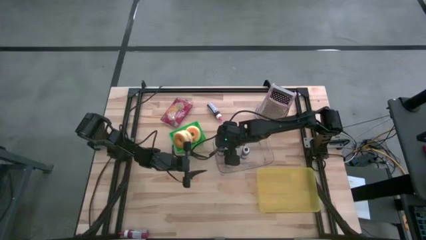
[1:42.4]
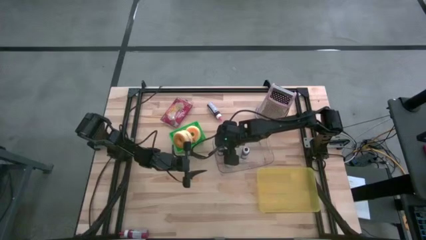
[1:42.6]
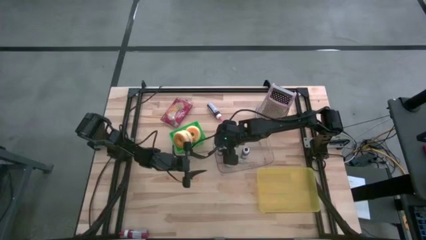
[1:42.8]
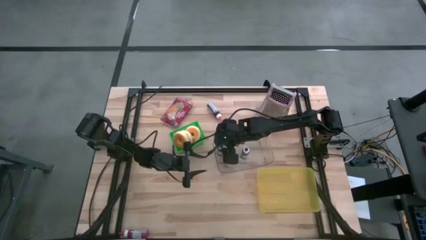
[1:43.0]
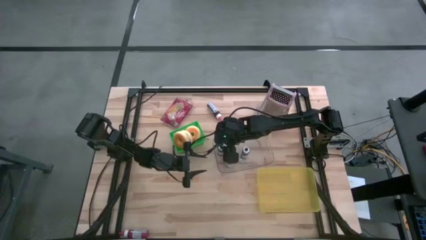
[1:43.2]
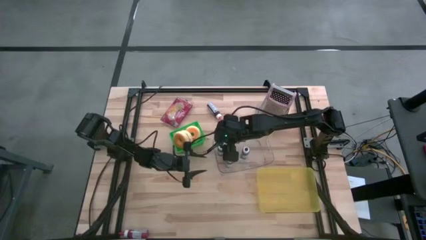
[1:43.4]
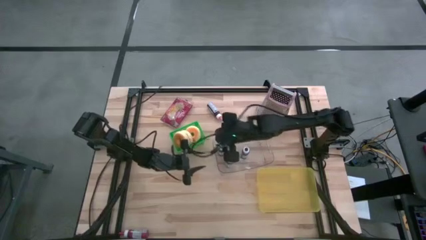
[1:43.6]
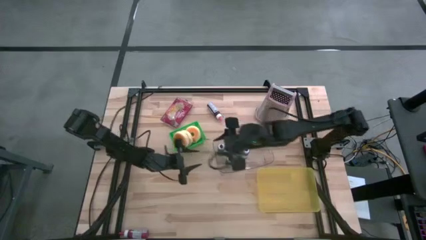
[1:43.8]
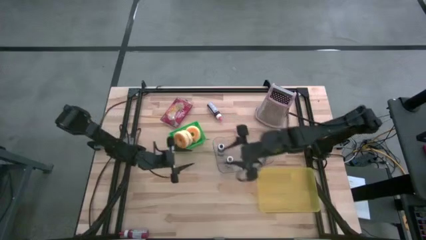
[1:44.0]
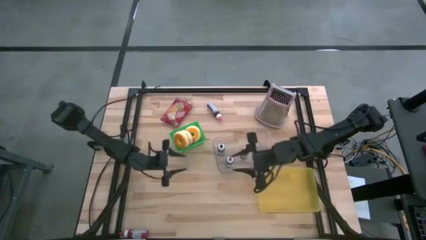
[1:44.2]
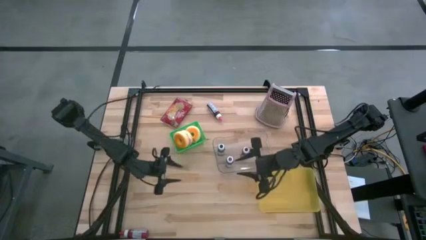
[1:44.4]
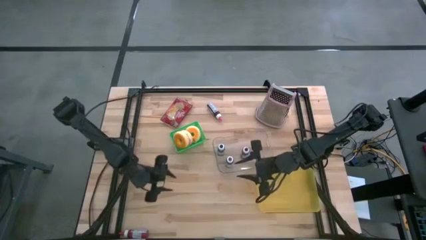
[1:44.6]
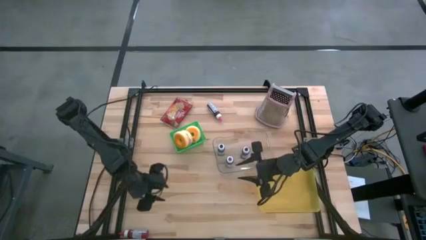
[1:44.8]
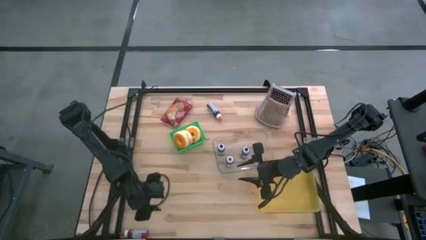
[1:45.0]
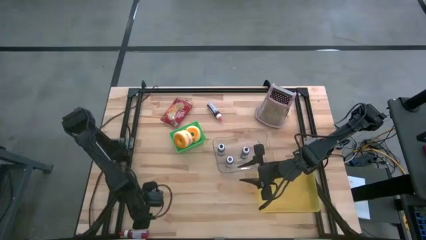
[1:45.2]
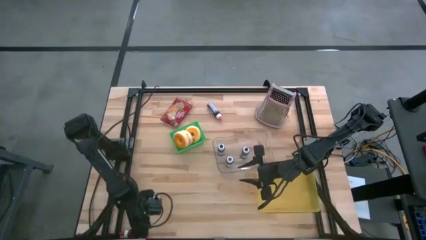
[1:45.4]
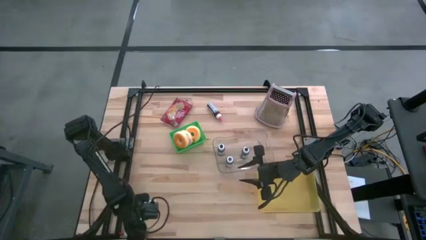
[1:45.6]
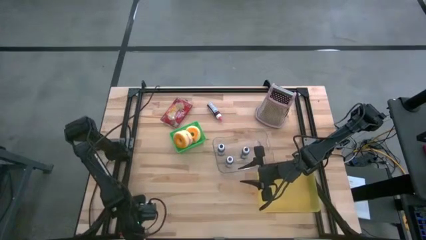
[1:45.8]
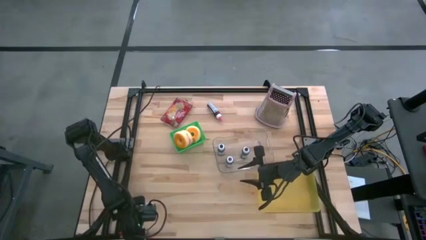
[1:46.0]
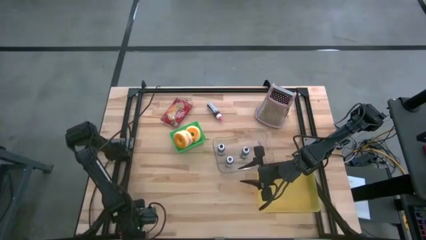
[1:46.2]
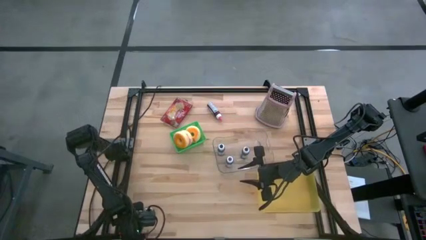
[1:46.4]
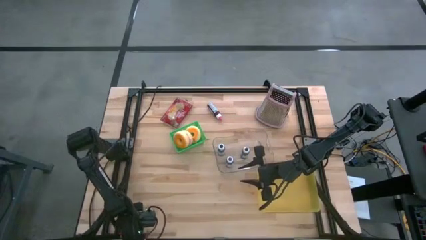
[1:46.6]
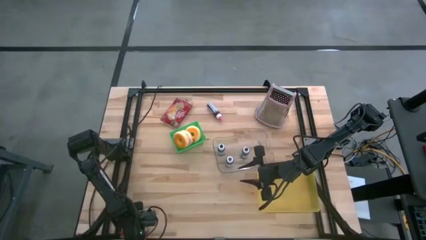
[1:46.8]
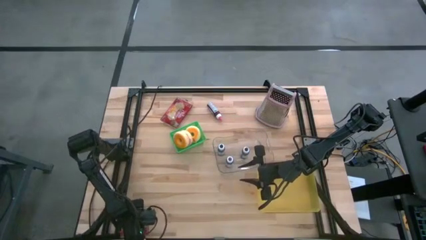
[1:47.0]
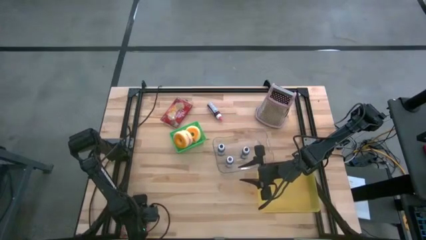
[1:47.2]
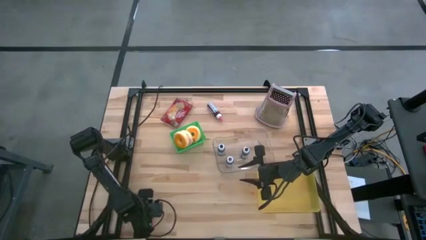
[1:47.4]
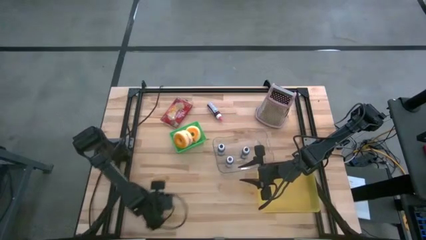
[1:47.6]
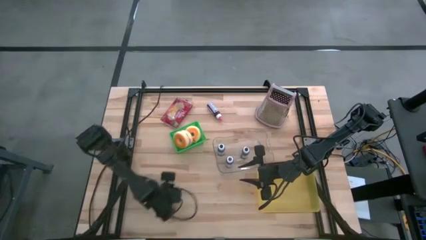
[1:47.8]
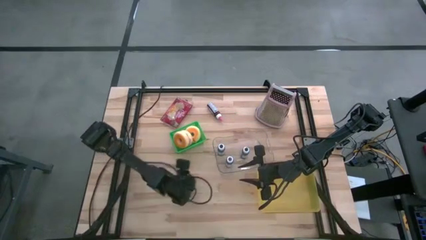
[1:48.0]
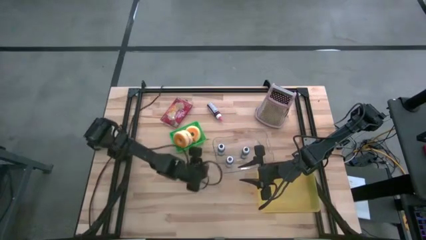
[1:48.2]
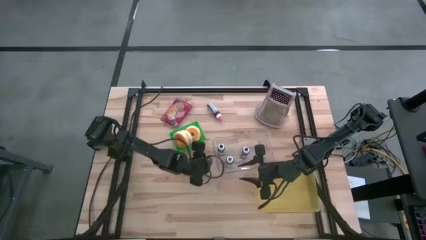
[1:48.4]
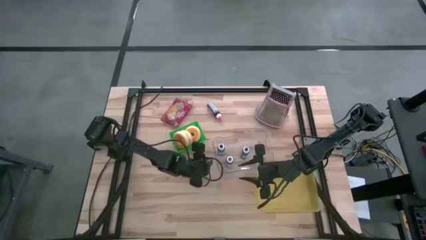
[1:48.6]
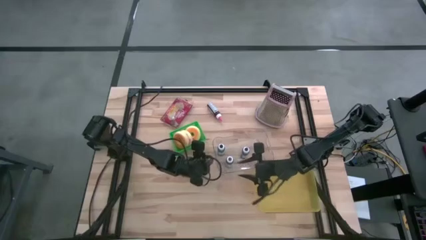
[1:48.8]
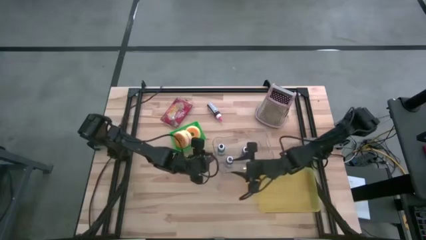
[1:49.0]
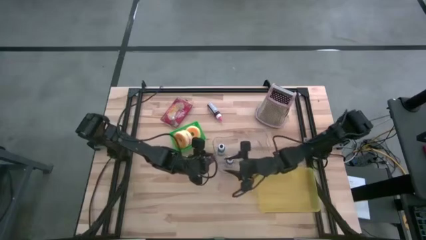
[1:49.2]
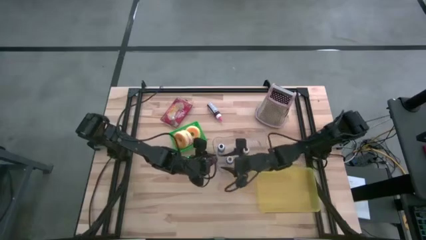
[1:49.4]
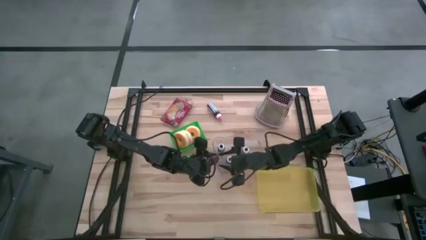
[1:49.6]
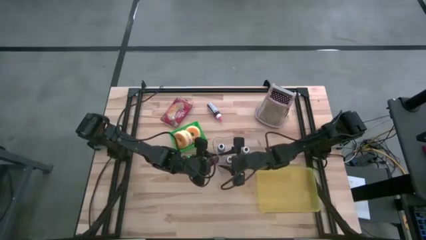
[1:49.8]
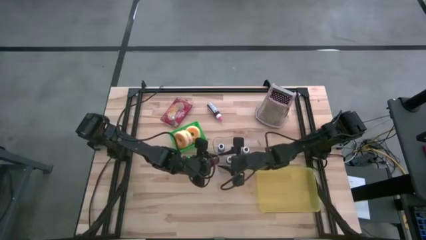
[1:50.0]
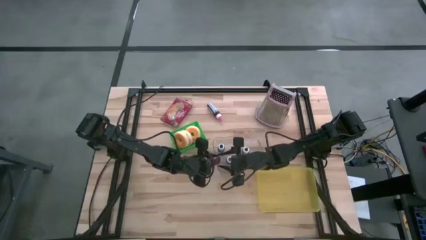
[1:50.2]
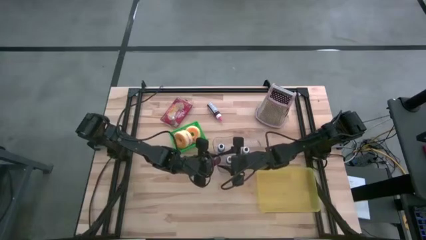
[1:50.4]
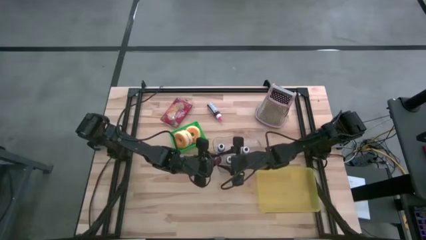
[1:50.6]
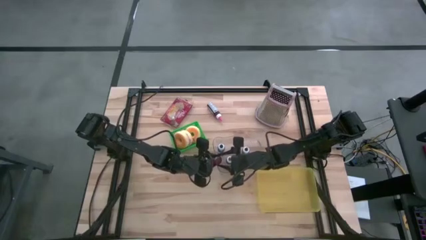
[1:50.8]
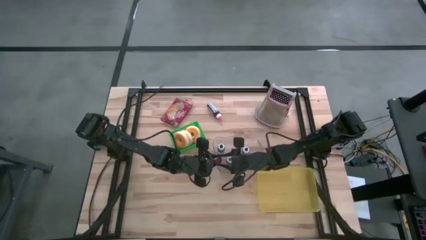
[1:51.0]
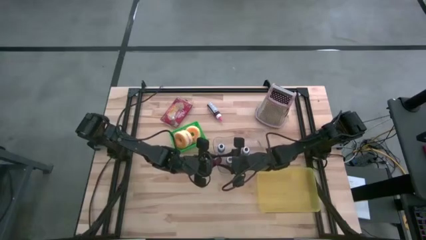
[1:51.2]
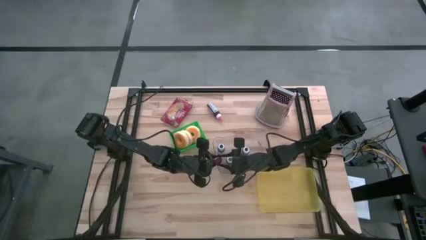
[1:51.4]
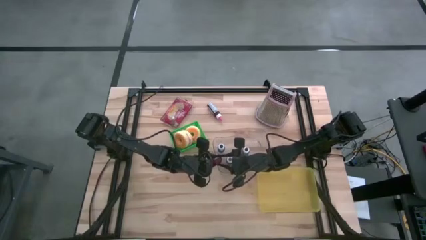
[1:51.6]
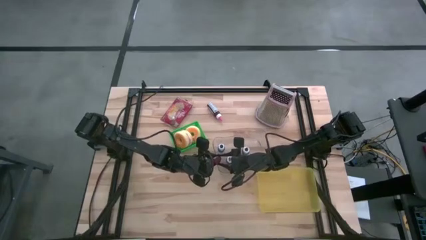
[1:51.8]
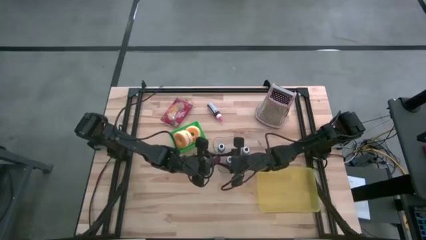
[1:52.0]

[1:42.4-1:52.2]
Task: Pick & Place Food Item
Put the red food coloring bottle into the transparent bin

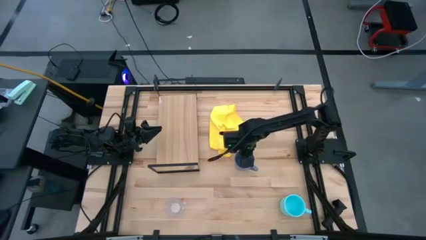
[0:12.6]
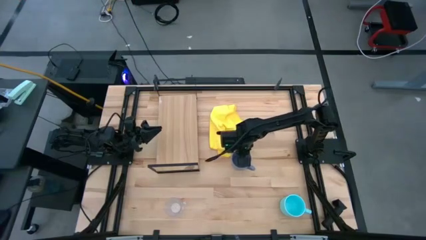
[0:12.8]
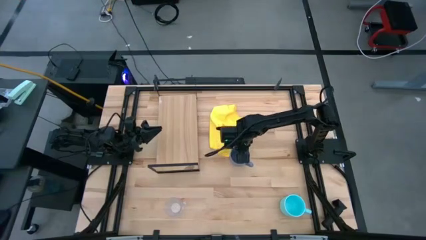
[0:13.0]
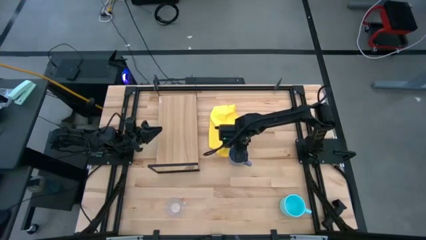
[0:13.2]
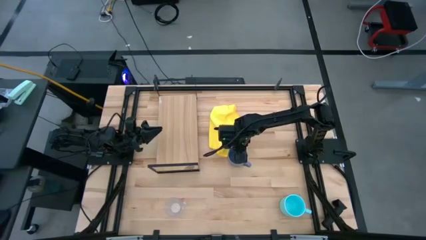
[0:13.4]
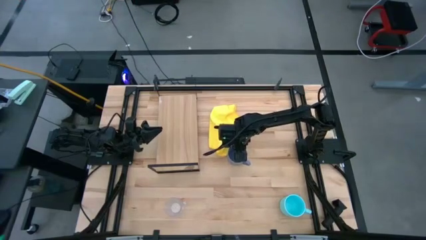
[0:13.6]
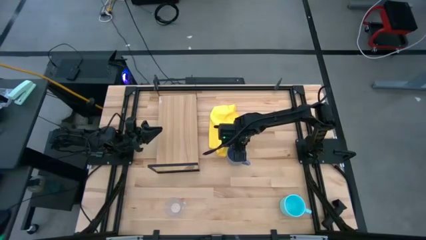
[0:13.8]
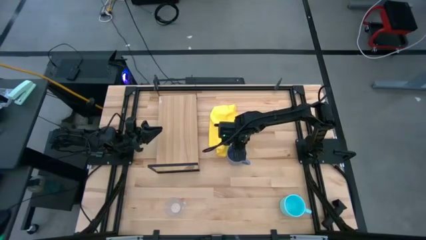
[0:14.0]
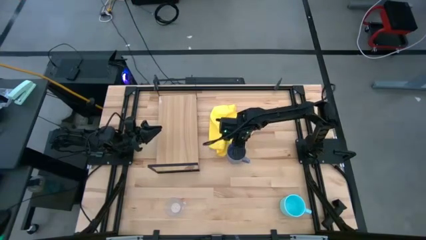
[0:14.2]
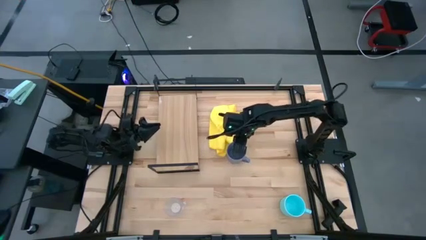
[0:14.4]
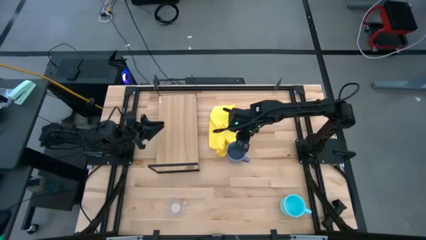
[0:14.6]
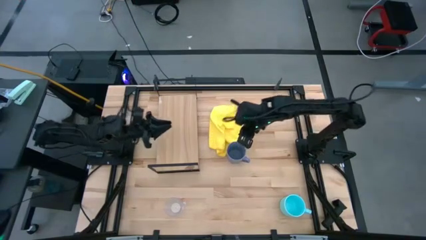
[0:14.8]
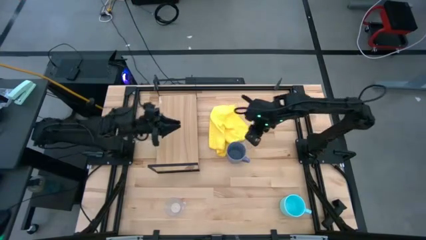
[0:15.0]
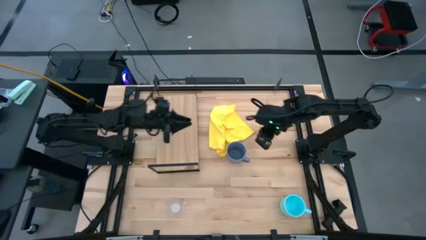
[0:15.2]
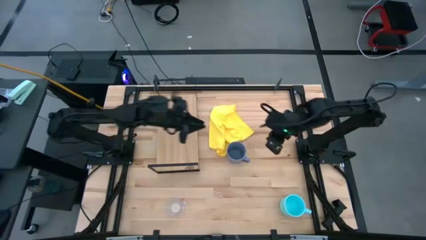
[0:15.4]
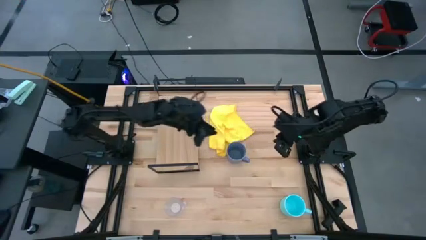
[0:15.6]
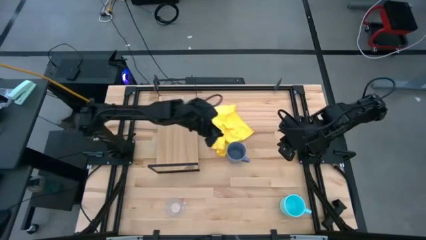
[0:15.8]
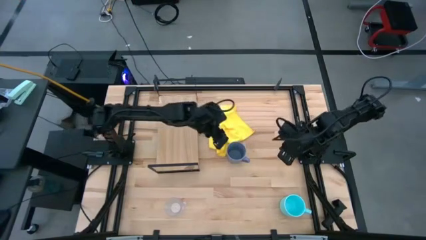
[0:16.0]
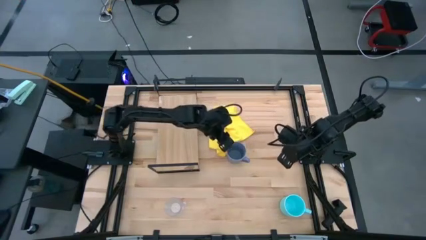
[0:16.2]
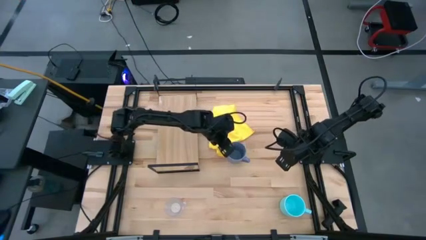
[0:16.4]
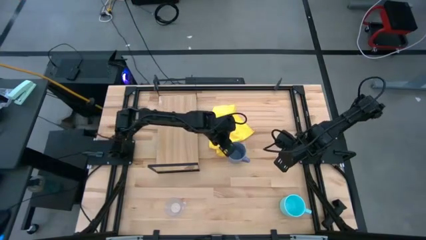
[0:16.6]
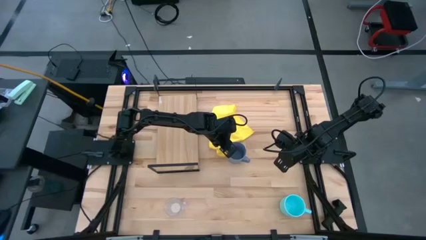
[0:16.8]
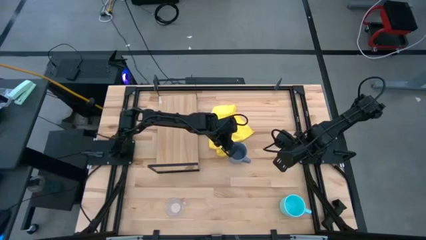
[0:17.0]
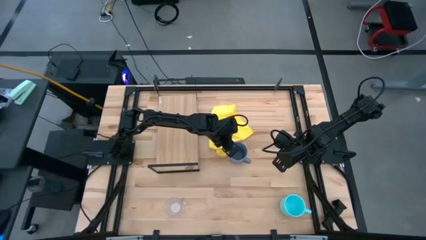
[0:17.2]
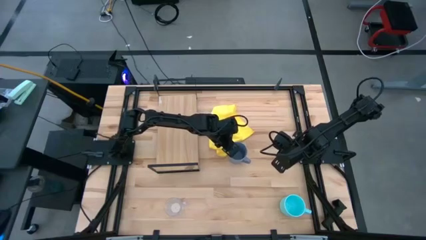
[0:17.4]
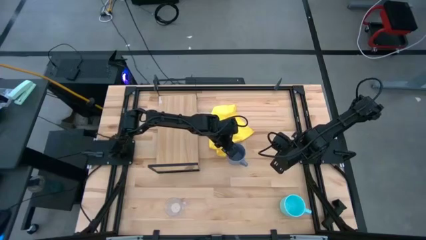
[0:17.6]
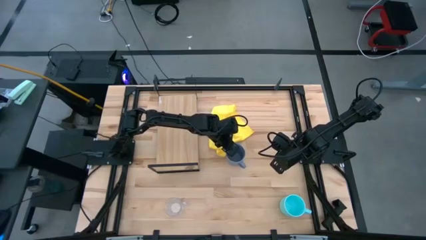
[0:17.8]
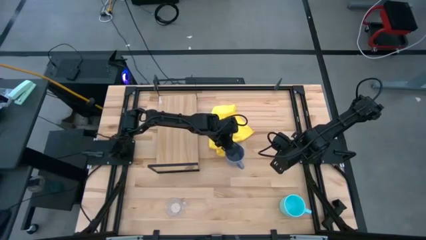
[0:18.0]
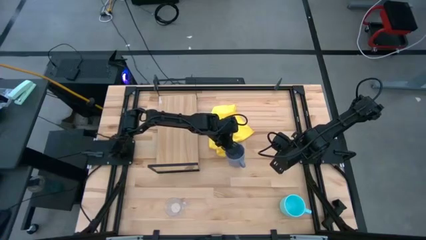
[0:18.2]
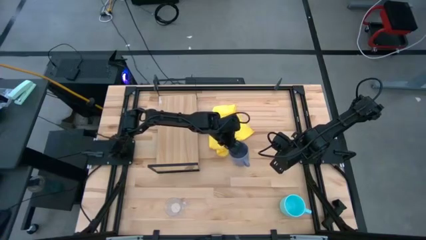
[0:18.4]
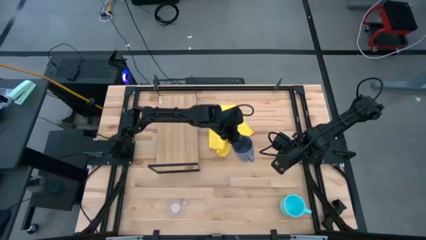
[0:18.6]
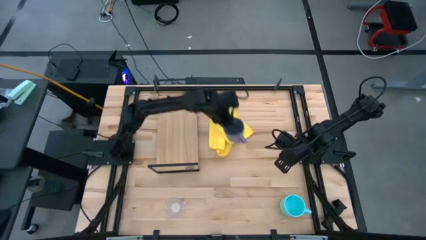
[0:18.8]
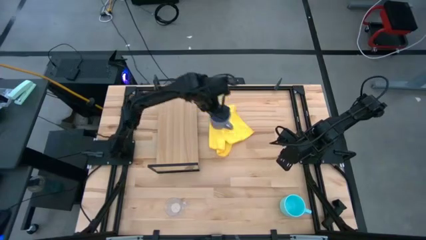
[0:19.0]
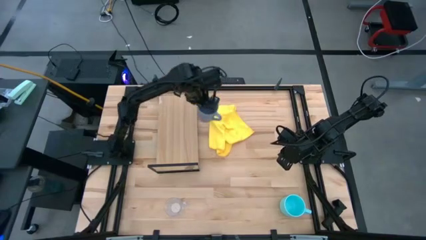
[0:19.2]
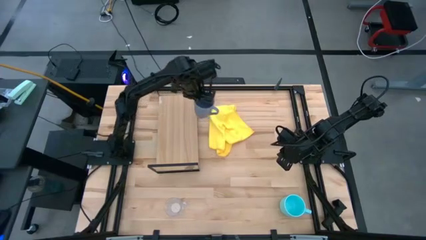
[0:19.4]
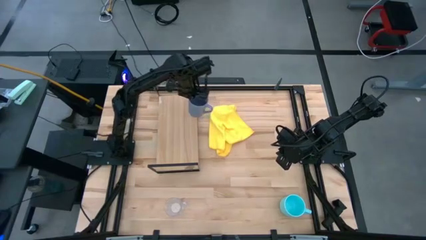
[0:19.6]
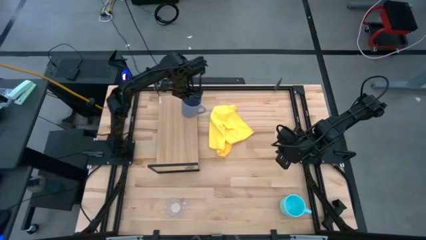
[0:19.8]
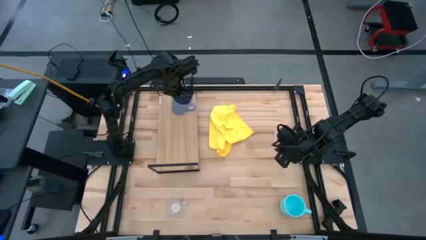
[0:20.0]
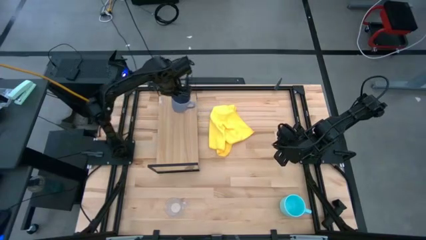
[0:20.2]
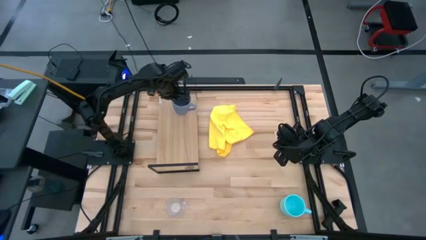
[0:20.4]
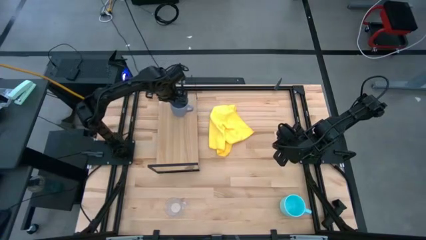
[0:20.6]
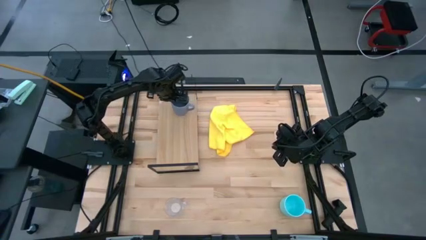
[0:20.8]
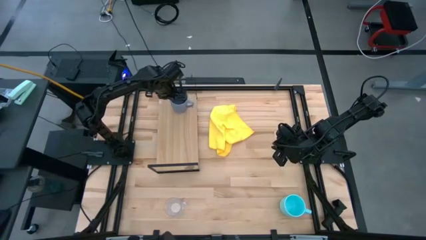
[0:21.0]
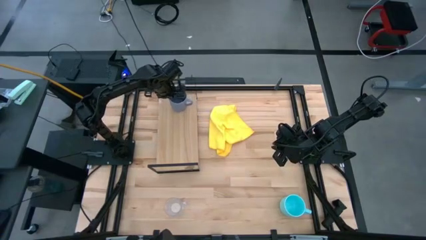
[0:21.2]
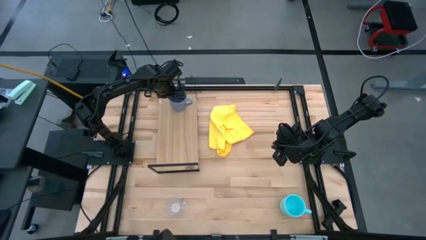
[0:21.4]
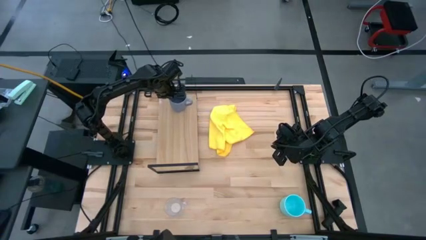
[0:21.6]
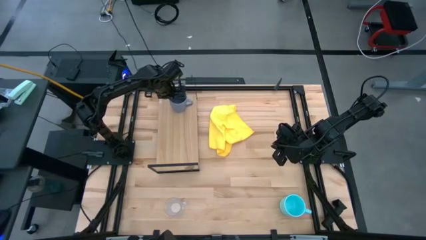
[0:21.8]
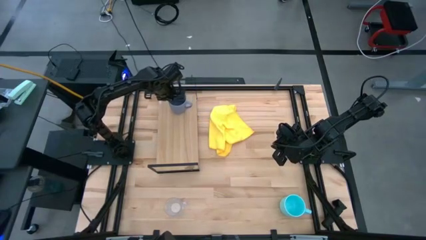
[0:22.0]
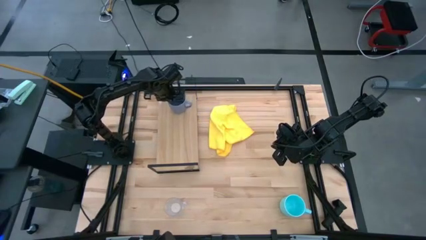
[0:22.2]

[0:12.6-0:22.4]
Task: Stack small to large cups/mugs on shelf
Put the violet mug on the shelf
